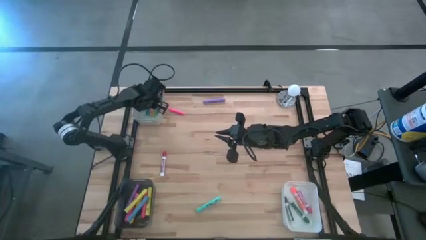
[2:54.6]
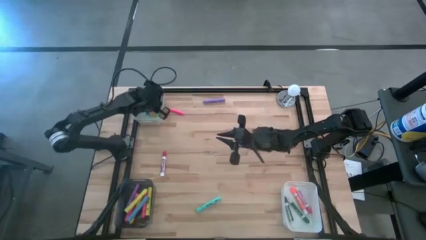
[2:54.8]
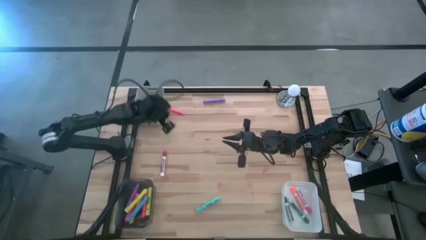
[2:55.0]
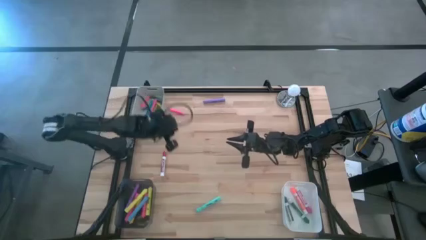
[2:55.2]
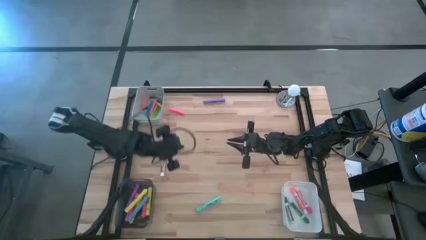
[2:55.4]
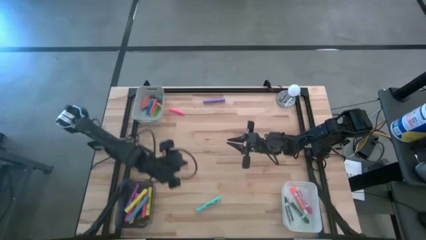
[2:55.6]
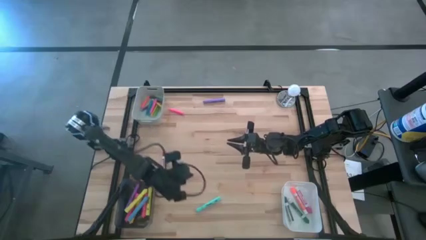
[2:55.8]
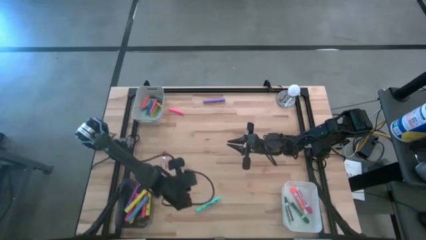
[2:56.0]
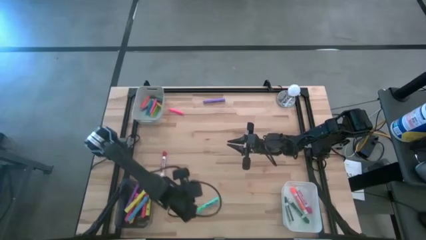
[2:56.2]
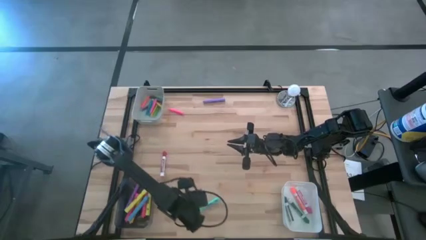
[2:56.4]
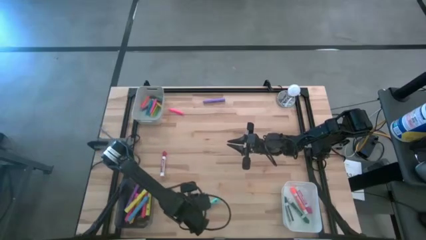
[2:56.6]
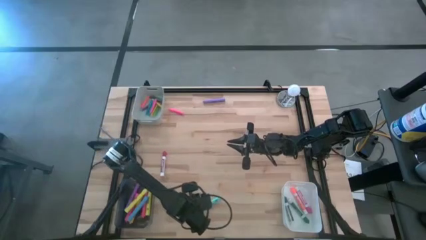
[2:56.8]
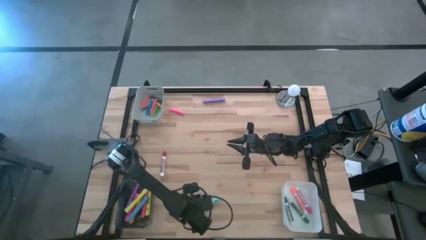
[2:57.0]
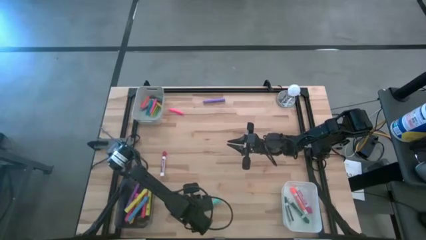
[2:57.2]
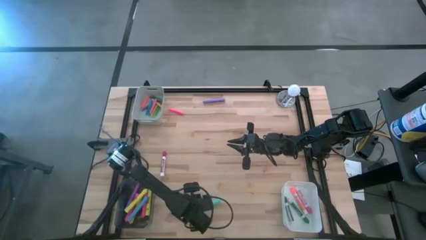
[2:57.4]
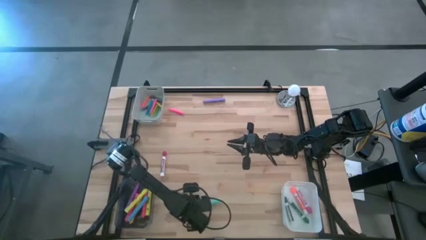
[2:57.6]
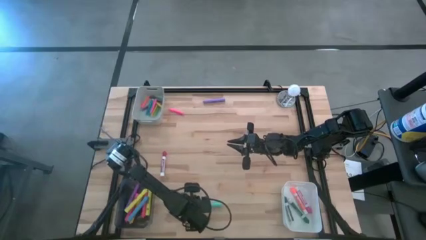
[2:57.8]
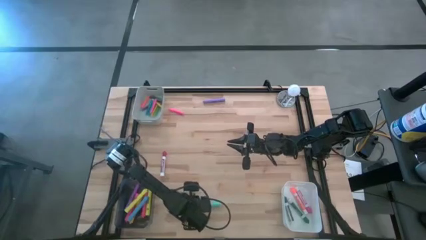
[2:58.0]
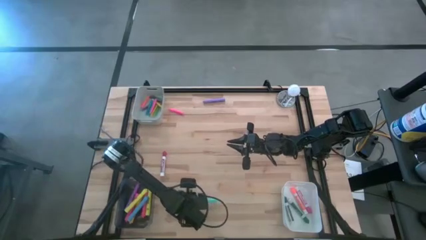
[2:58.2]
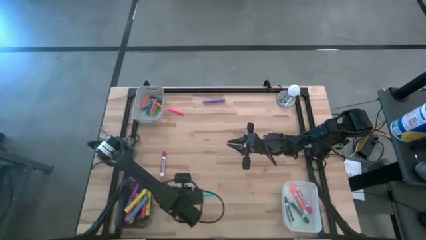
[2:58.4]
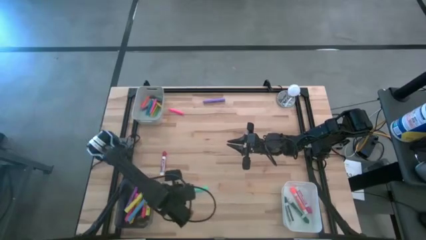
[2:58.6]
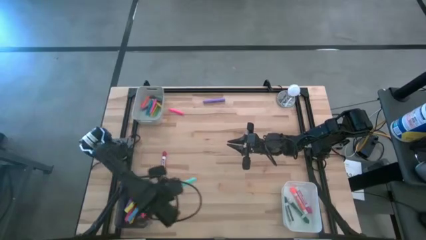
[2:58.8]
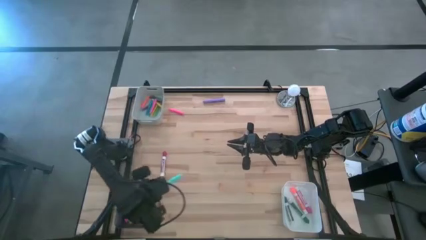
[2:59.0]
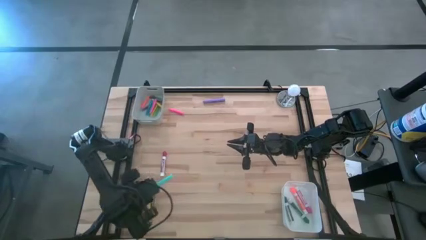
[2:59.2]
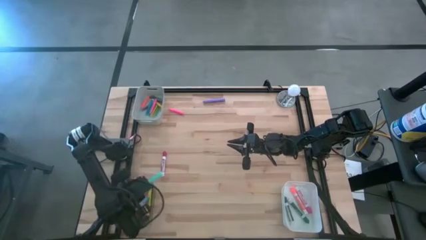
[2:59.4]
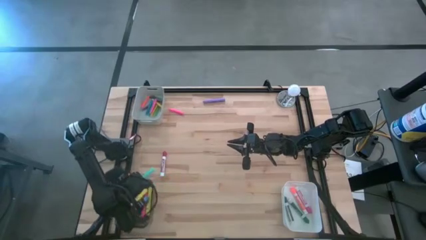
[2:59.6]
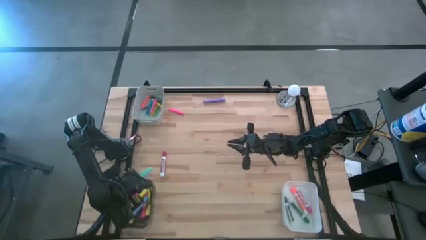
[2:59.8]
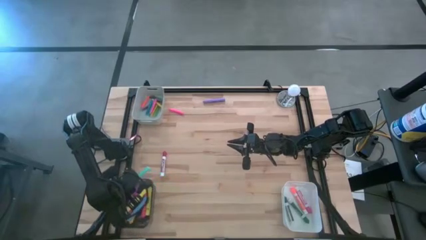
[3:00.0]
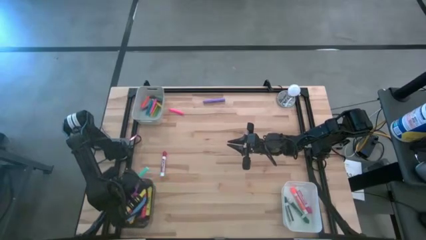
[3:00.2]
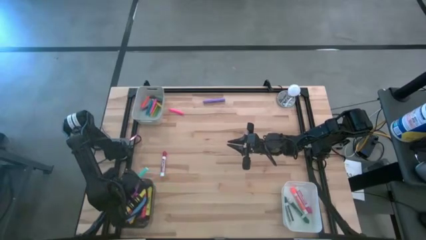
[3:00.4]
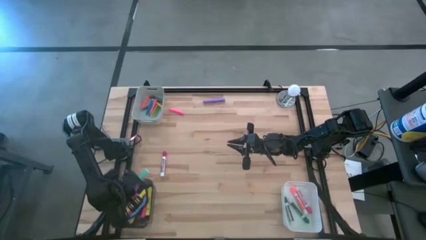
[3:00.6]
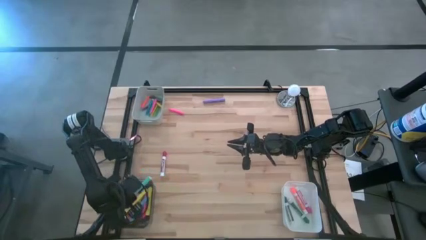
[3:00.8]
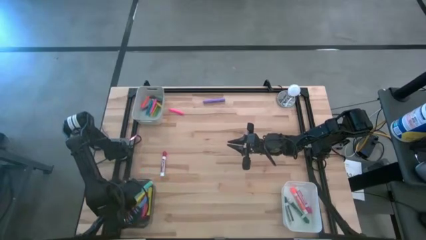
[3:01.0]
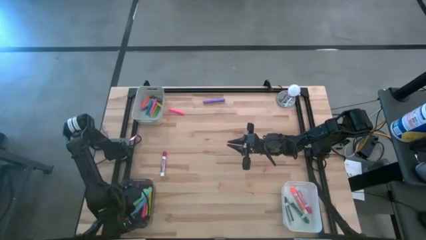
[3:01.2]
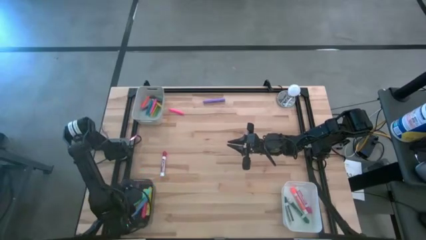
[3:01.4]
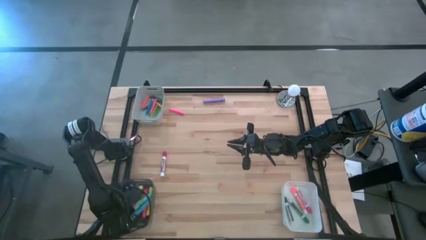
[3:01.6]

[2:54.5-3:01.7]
Task: Pick & Place Markers
Put the blue highlighter pen into the black bin

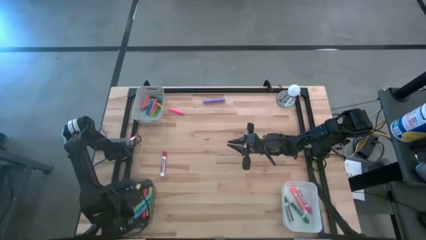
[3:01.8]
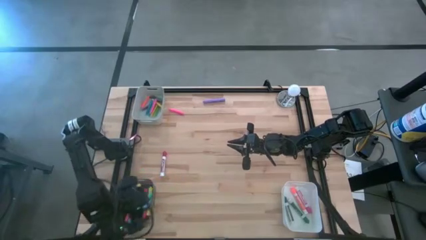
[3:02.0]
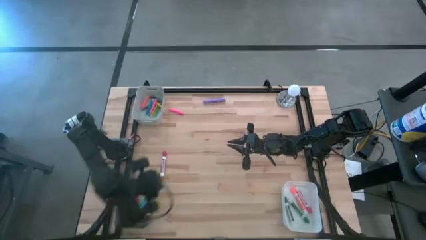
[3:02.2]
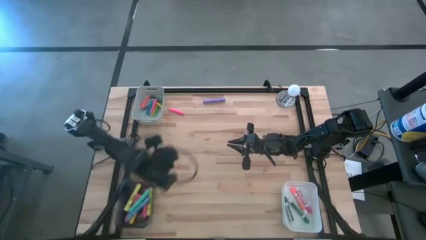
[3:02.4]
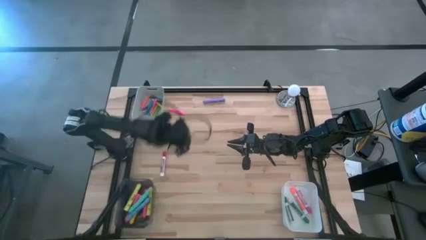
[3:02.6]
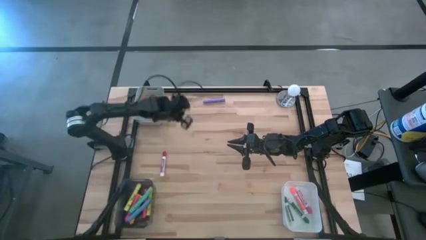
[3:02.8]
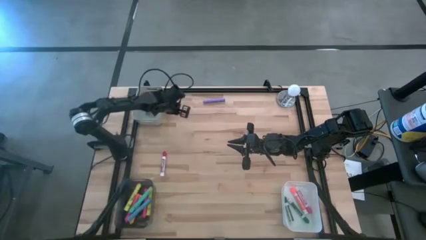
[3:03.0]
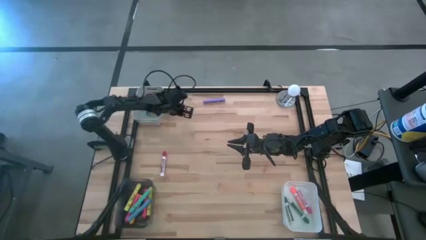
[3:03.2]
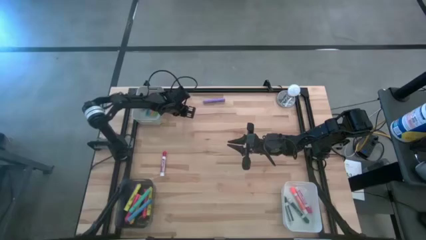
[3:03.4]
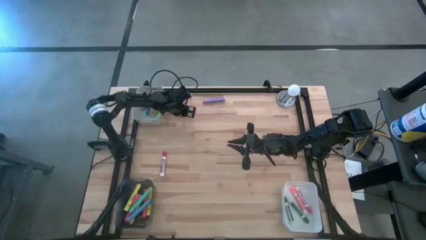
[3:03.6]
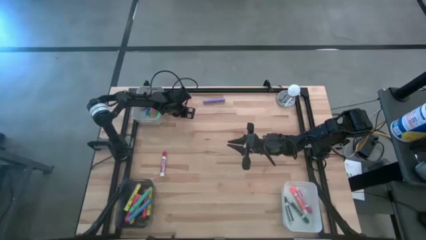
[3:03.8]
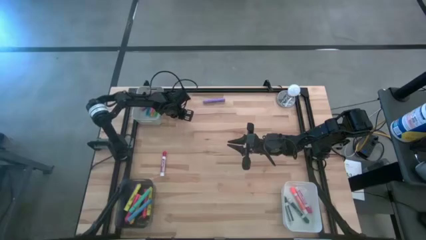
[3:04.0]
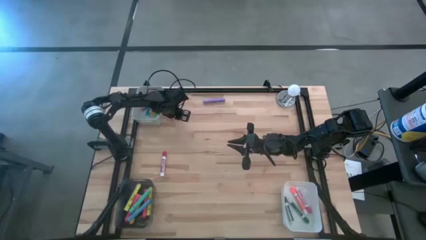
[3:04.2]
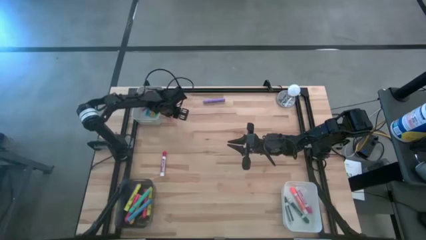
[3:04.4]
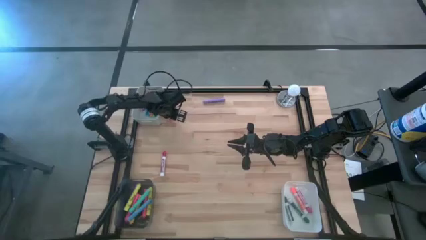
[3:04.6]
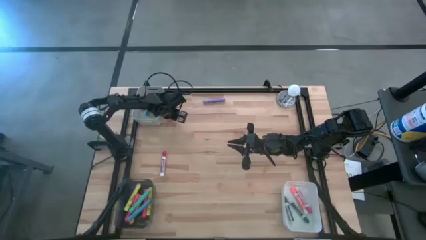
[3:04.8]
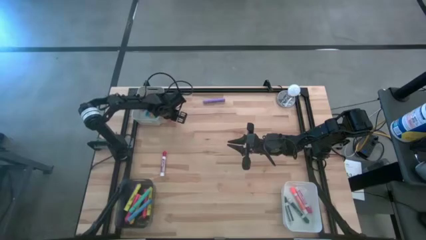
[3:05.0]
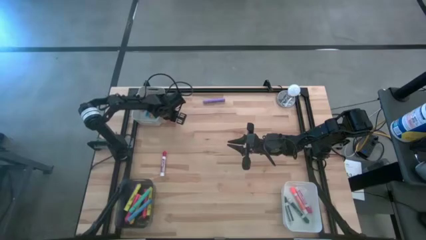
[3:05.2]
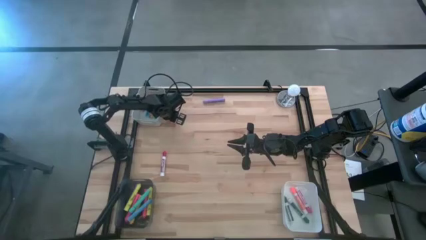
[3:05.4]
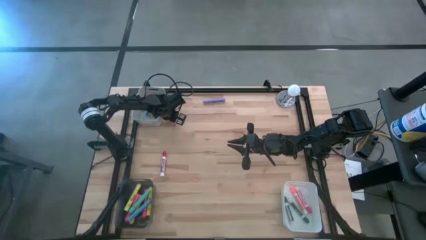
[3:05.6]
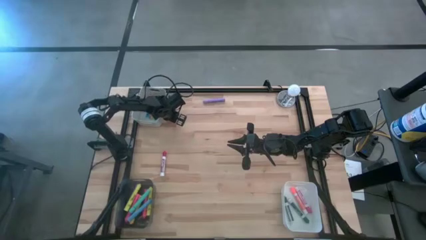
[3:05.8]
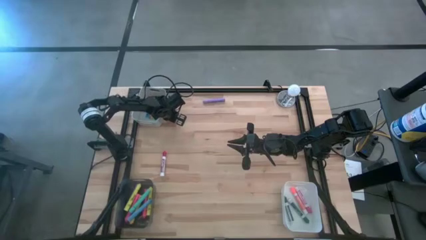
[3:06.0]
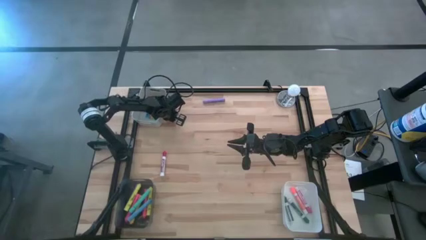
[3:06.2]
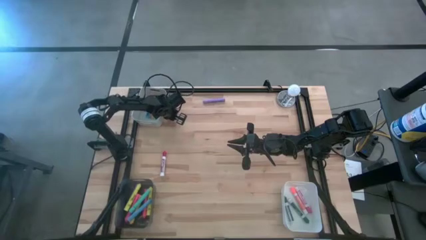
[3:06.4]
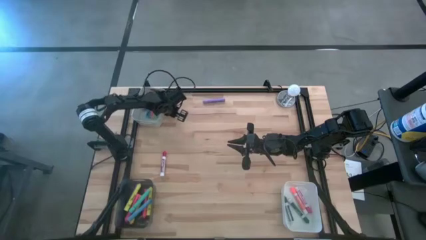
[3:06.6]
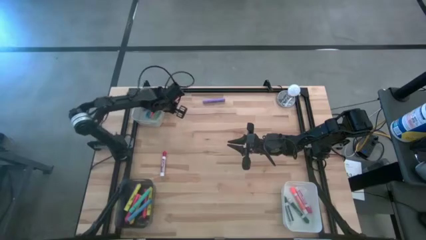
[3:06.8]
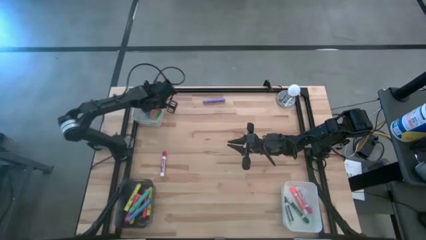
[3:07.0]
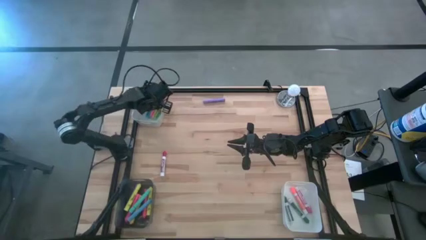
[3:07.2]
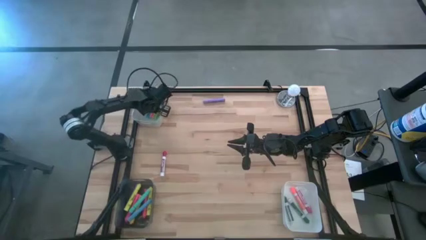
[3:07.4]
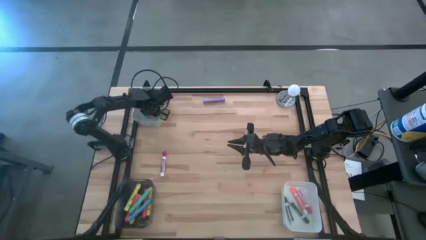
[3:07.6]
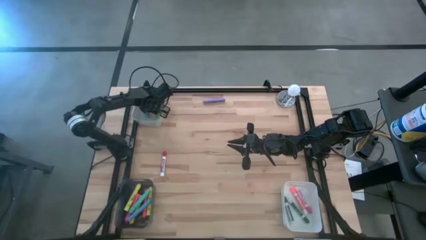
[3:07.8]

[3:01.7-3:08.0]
Put the pink pen into the gray bin

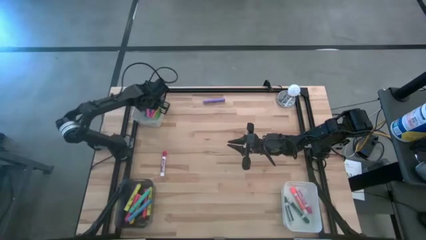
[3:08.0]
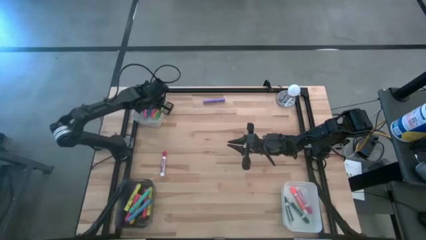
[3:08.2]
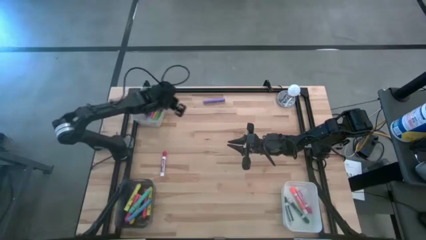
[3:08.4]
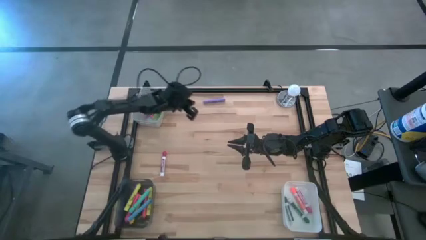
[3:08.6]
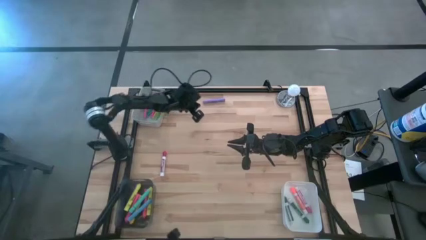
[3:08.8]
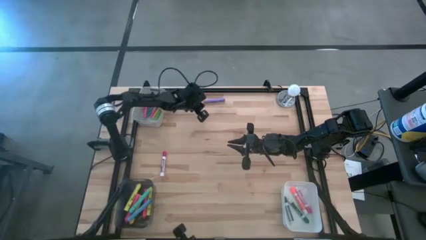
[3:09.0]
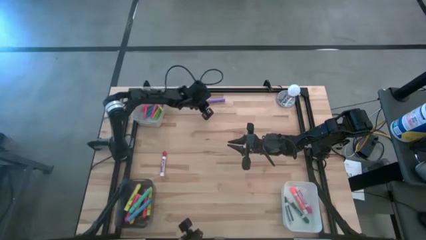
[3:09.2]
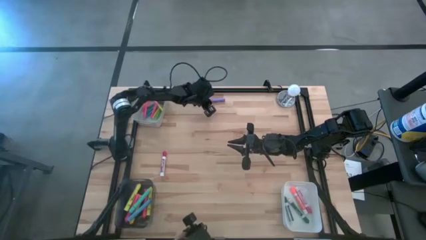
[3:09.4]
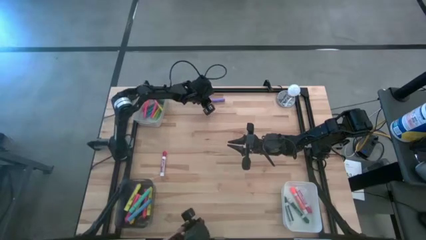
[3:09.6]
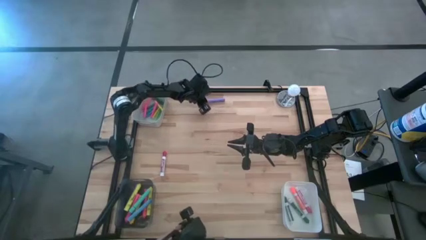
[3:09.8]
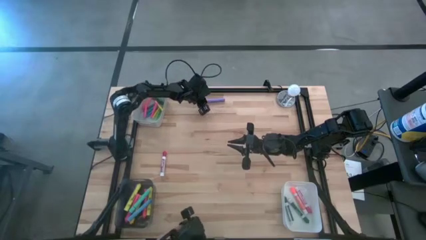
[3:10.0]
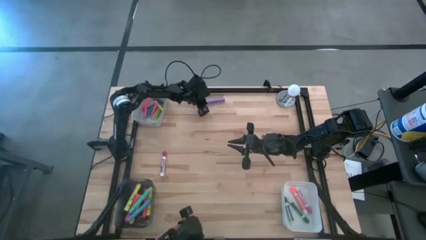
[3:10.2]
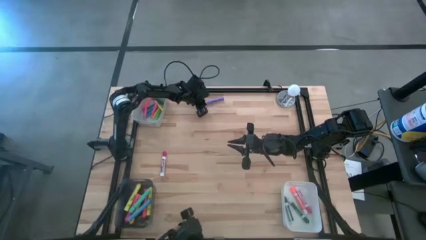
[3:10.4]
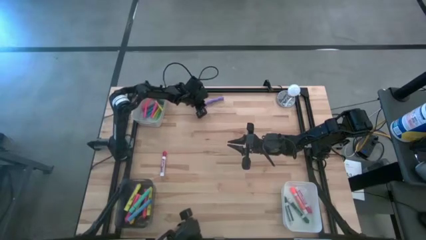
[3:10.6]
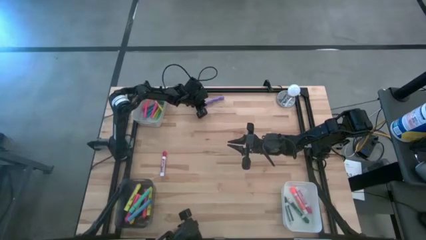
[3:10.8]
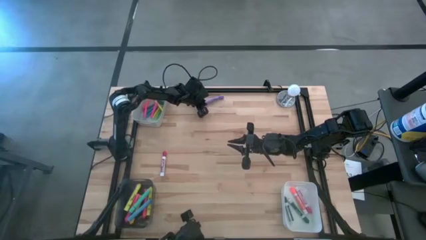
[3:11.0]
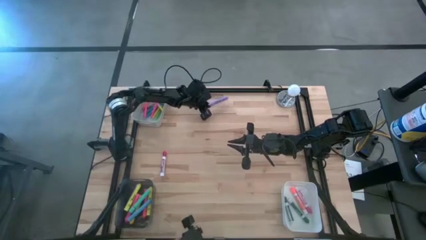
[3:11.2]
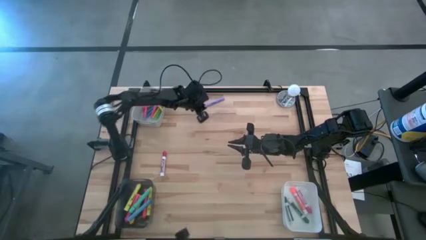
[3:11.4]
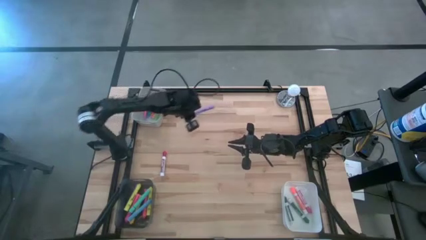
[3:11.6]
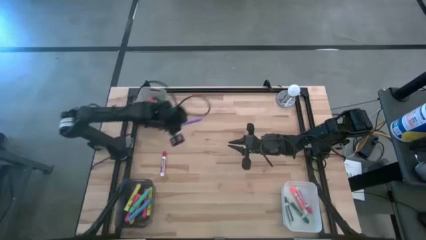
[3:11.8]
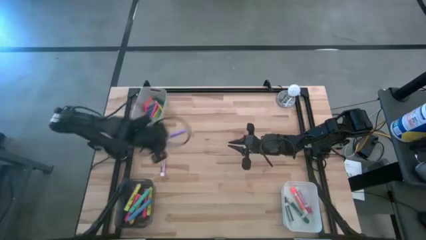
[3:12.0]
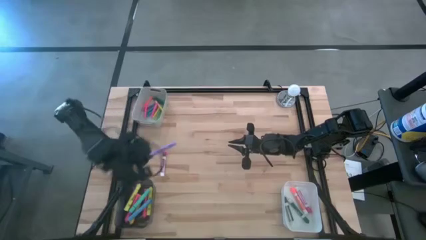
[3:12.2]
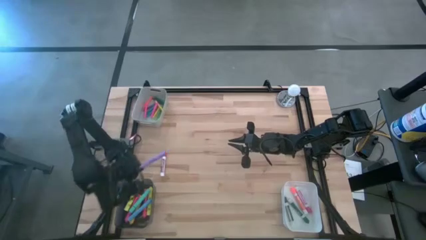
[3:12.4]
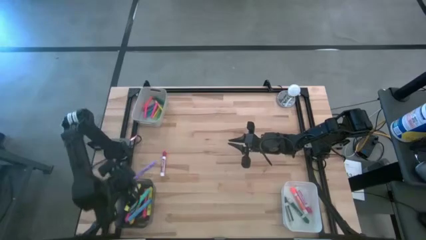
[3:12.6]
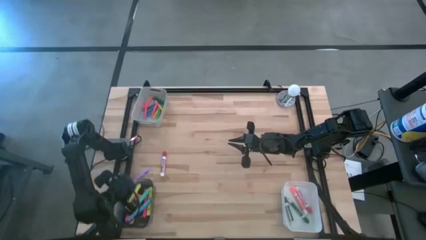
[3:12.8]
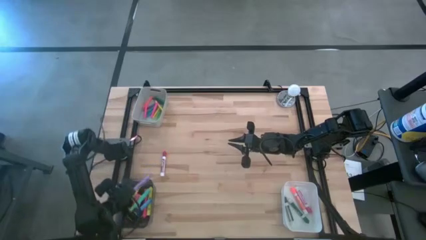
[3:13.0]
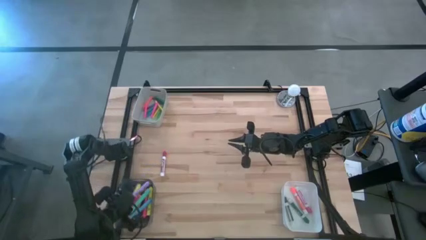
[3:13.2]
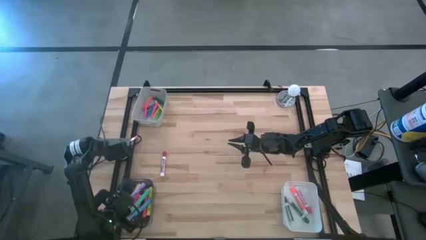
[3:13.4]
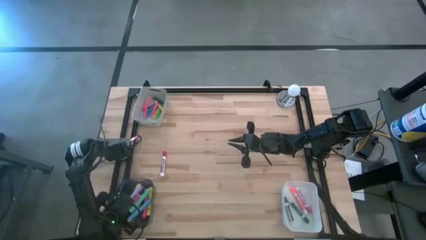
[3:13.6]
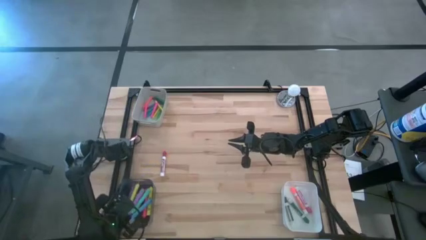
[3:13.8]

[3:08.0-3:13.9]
Put the violet marker pen into the black bin
